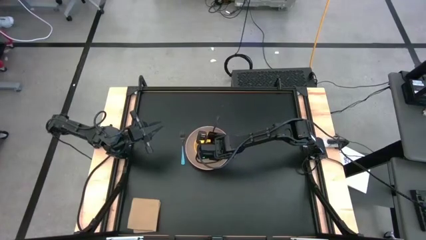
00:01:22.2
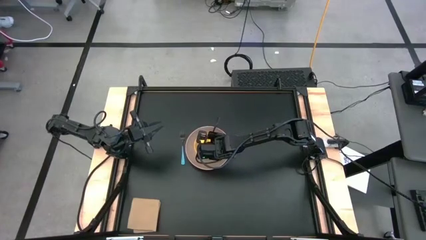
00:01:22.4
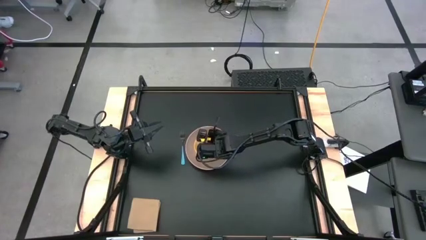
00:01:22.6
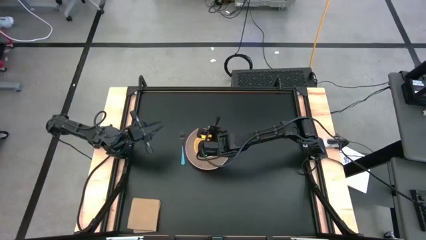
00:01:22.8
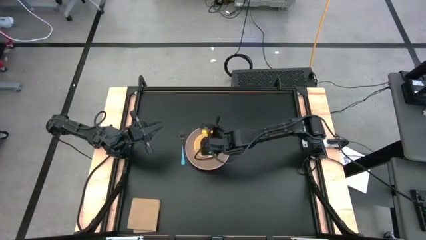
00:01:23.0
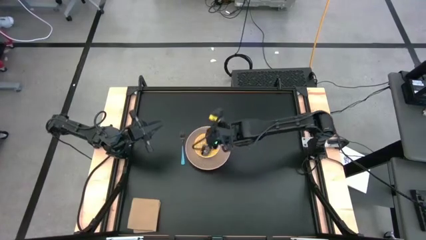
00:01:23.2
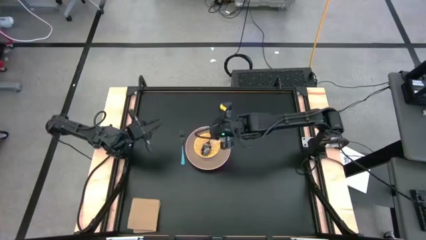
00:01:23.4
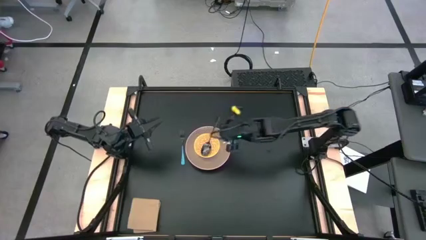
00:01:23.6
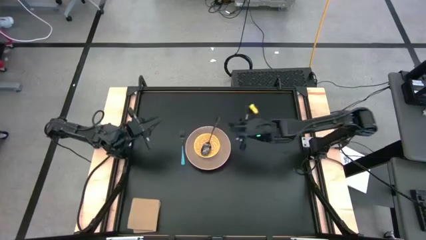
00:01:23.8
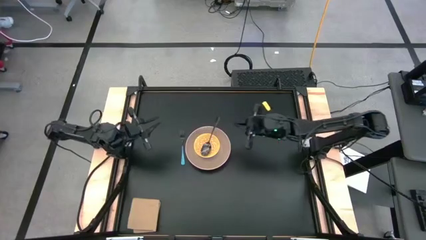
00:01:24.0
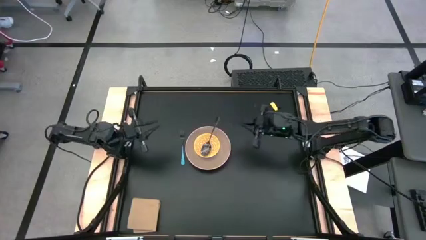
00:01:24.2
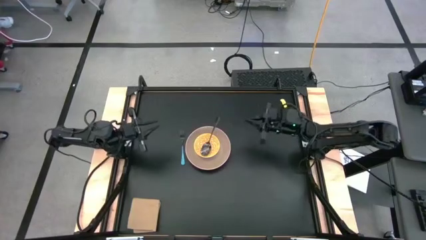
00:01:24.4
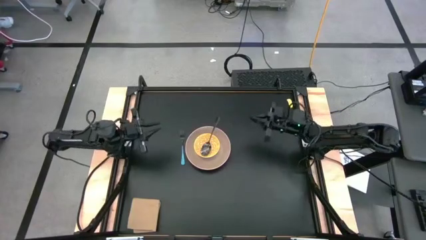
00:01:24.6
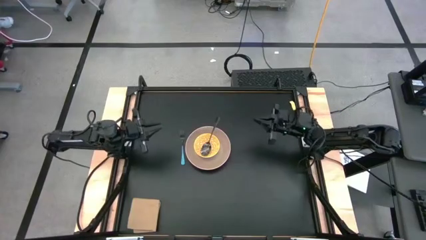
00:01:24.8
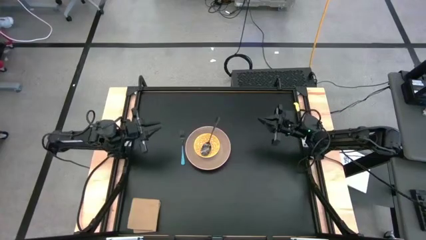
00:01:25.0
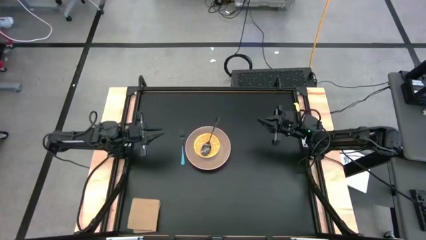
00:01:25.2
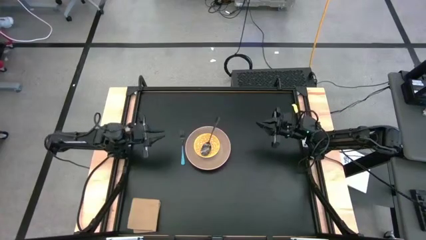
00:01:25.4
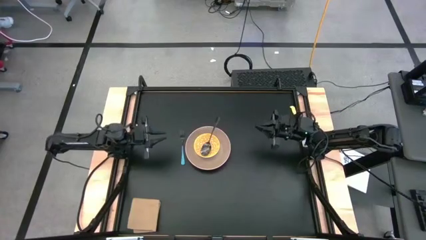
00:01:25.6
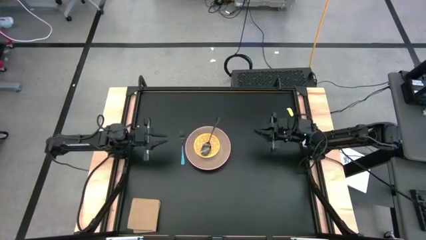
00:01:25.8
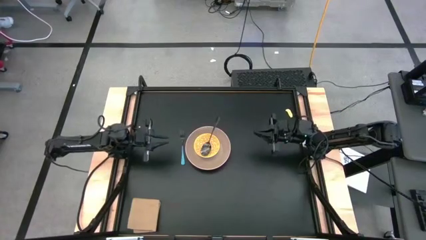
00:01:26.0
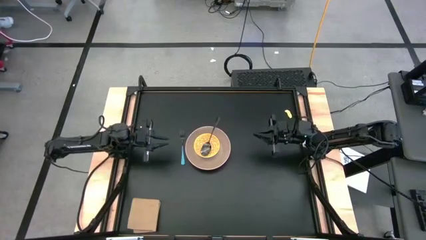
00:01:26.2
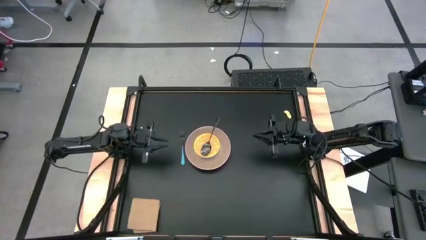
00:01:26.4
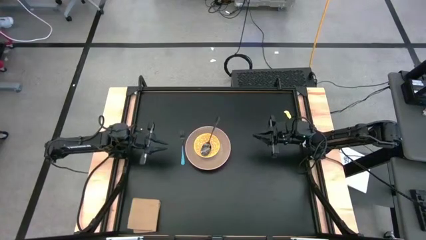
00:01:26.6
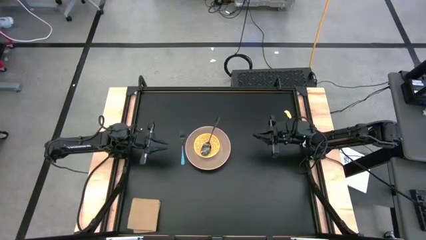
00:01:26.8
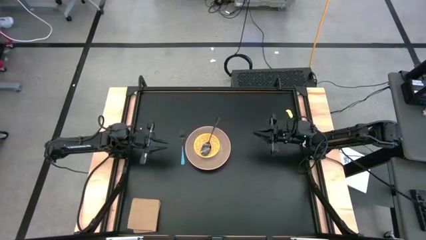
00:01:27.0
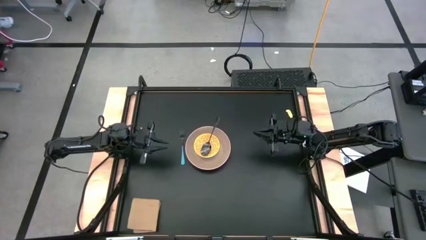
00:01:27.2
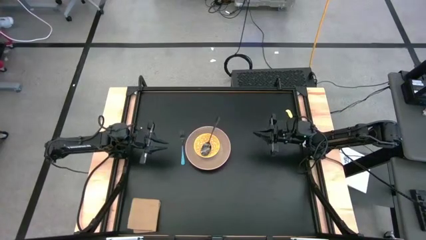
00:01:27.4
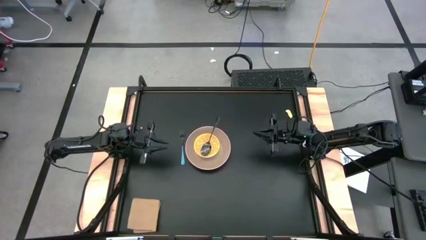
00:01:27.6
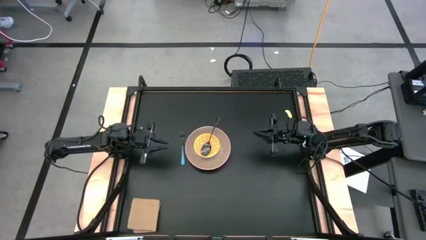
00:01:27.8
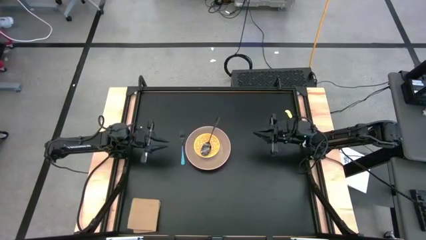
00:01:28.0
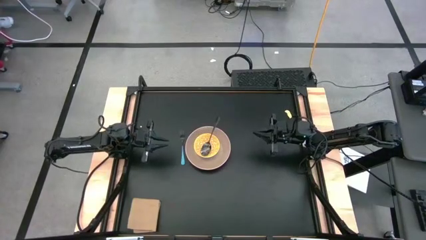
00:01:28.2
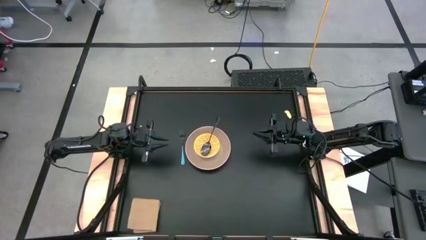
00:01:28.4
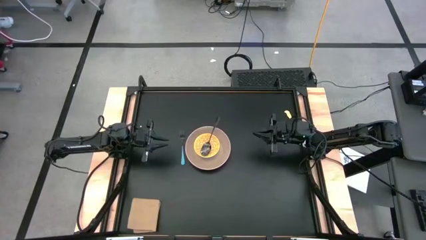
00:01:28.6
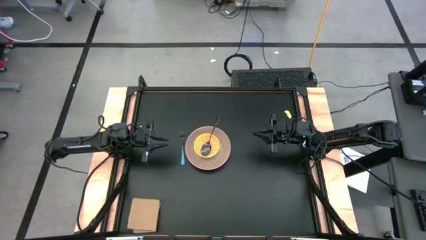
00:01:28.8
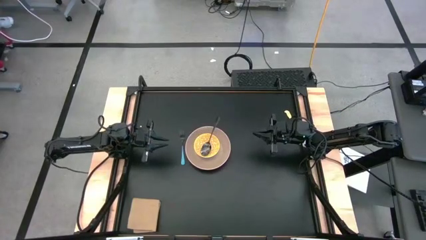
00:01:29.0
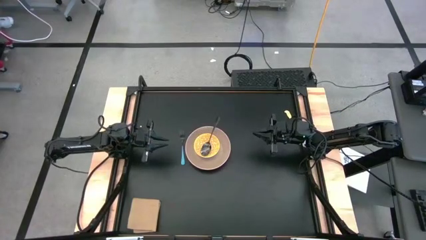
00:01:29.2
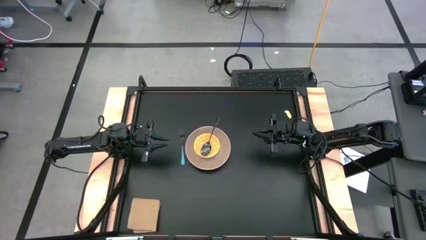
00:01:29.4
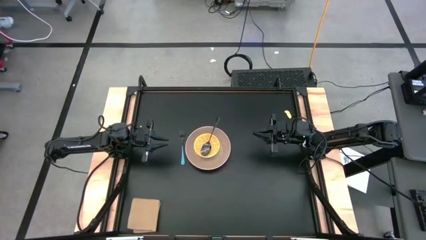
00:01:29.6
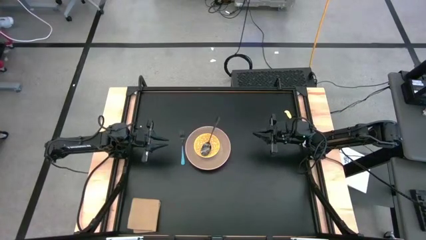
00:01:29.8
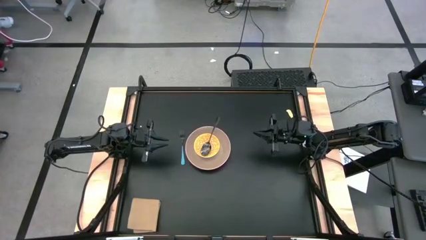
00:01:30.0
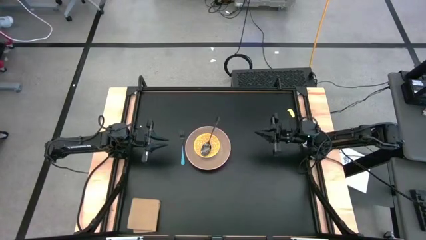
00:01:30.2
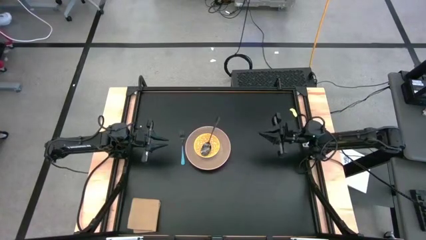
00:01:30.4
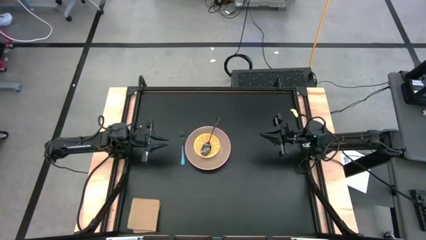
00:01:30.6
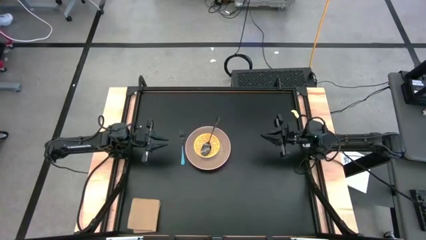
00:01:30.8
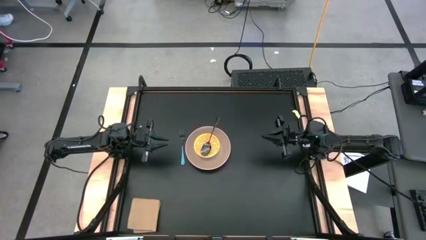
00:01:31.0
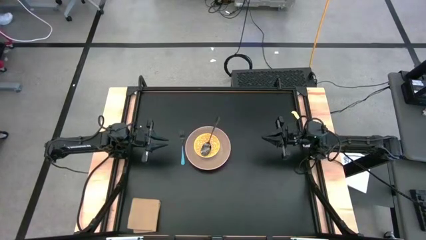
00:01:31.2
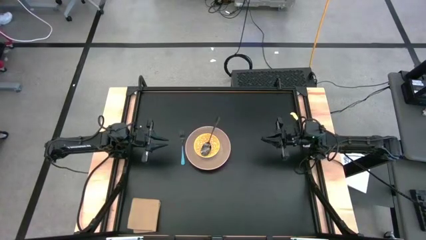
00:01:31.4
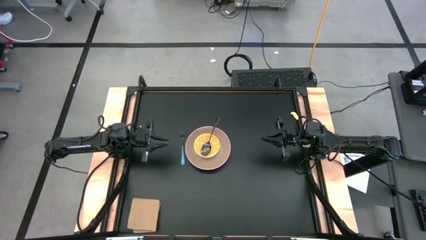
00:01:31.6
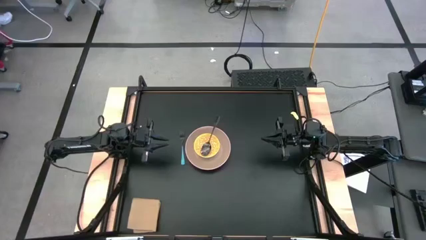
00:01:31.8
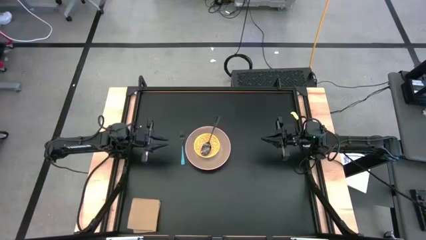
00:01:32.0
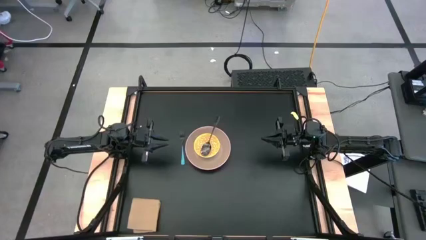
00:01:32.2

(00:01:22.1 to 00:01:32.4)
Task: Set table place
Return to Home Position

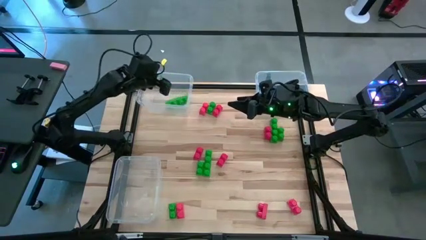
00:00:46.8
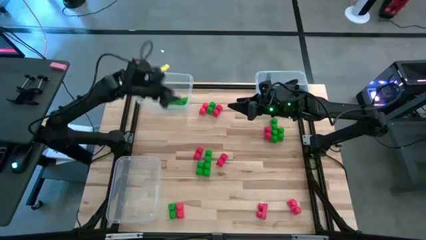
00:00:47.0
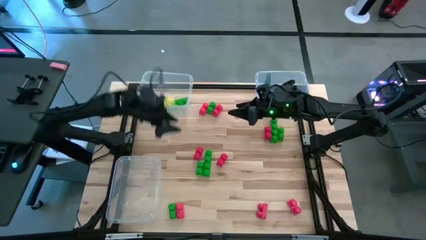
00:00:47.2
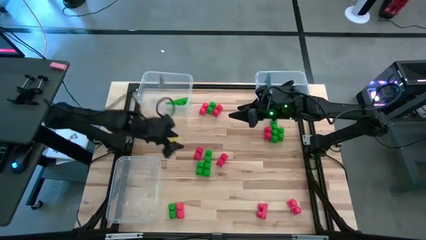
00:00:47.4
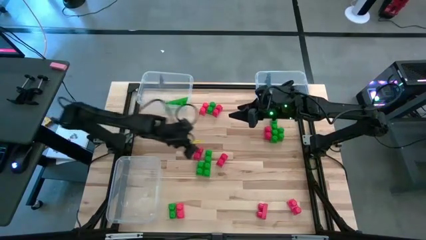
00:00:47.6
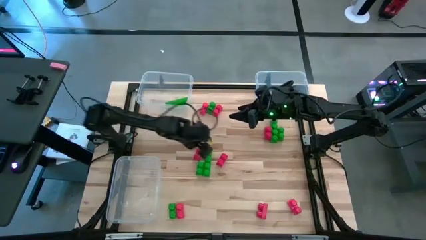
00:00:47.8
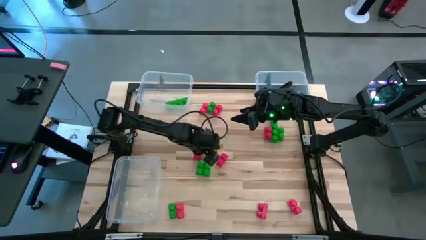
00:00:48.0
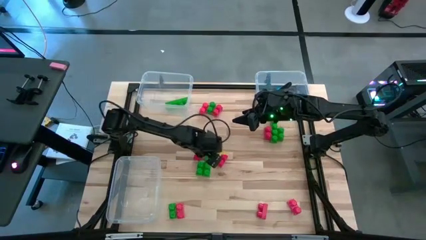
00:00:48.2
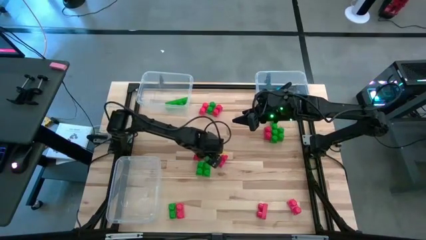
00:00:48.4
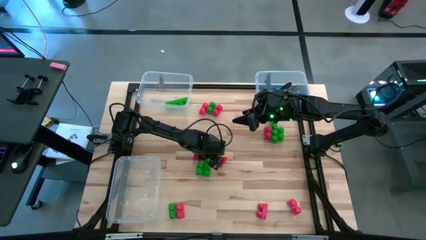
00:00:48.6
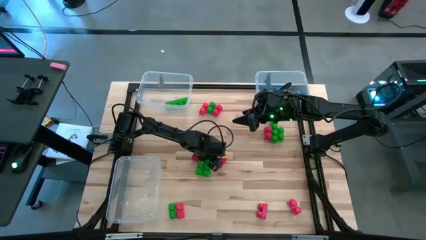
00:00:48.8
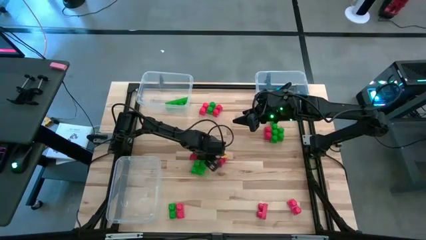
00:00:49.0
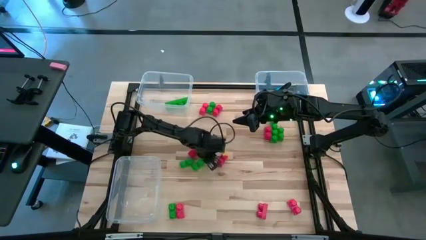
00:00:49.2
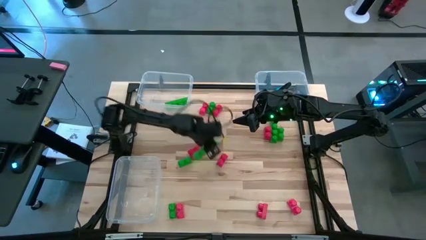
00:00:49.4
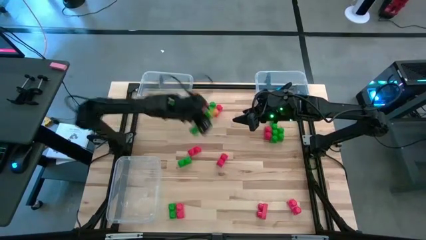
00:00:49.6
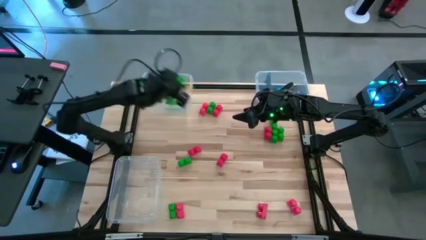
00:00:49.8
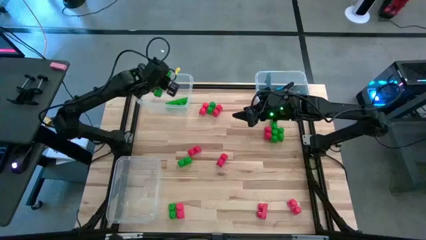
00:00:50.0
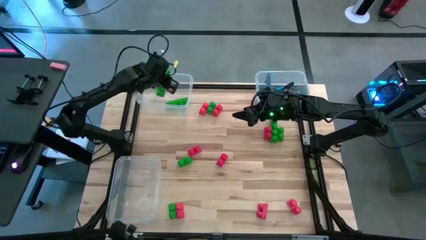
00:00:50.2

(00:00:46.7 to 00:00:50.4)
Task: Sort blocks
Put the green game piece into the top left transparent bin

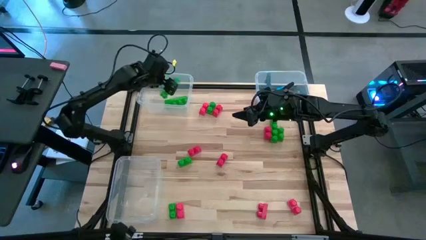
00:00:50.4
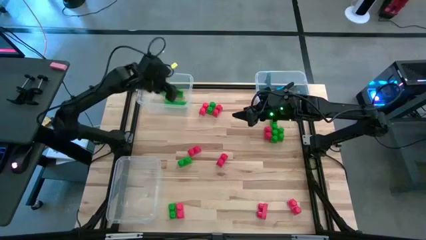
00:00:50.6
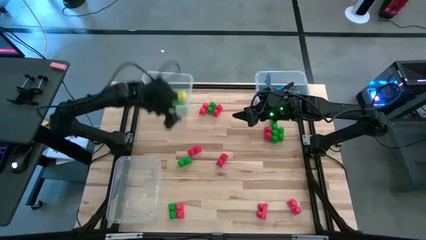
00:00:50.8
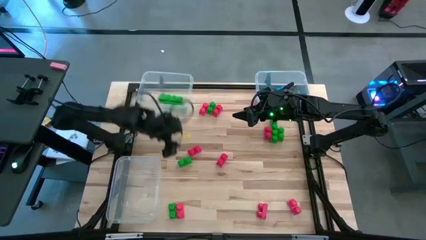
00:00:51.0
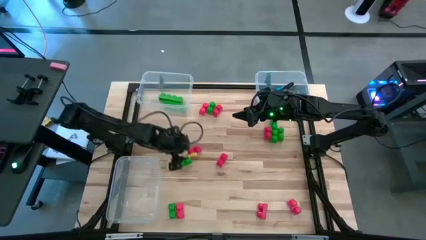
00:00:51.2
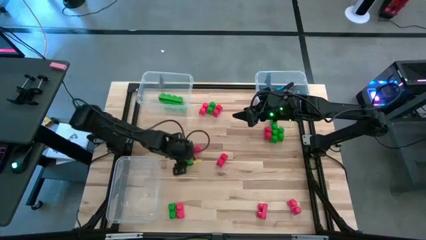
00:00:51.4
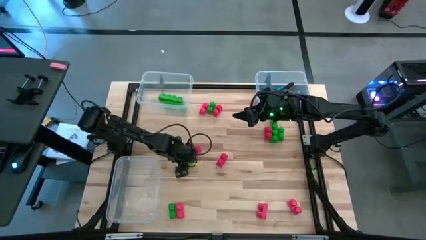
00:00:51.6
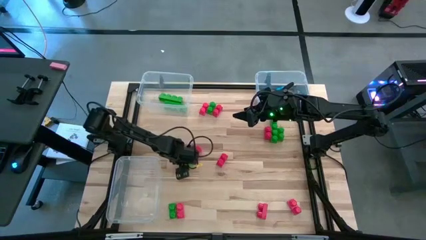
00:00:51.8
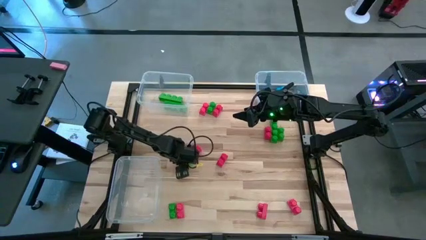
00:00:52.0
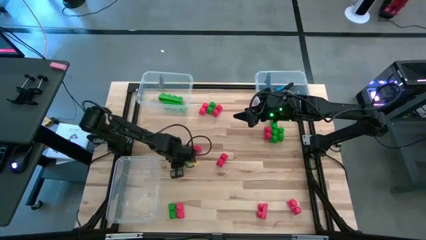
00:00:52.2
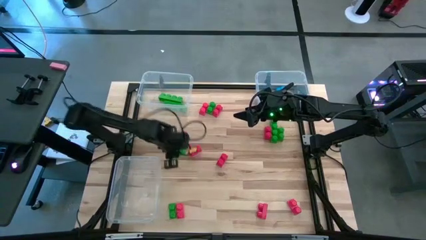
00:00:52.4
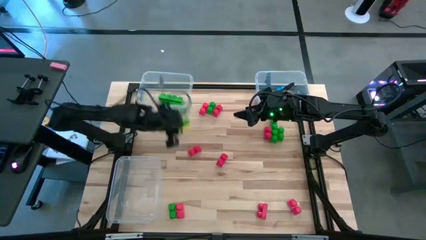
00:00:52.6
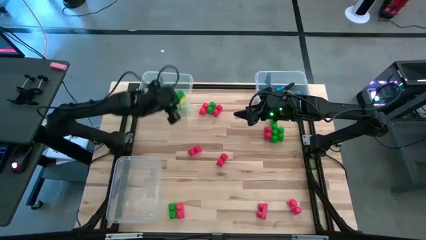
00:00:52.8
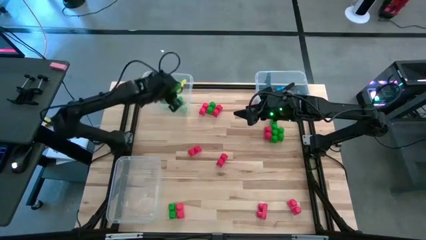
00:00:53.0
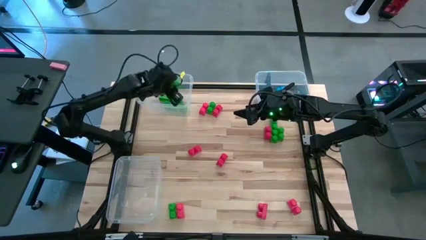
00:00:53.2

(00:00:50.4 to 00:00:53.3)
Put the green game piece into the top left transparent bin
